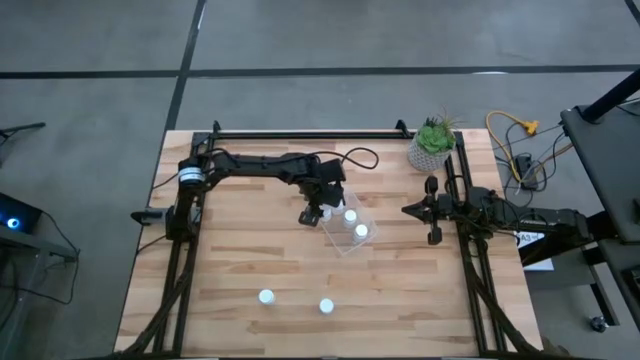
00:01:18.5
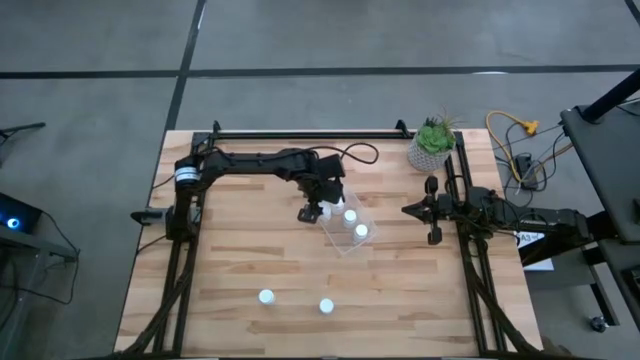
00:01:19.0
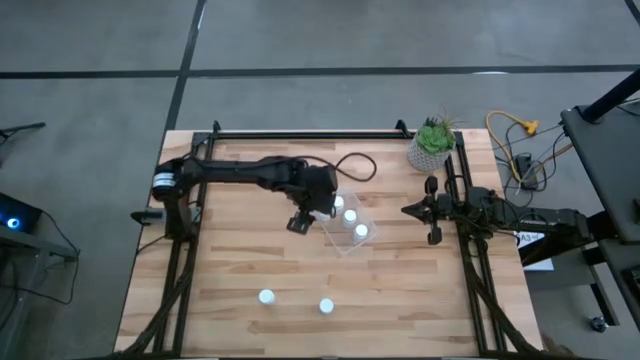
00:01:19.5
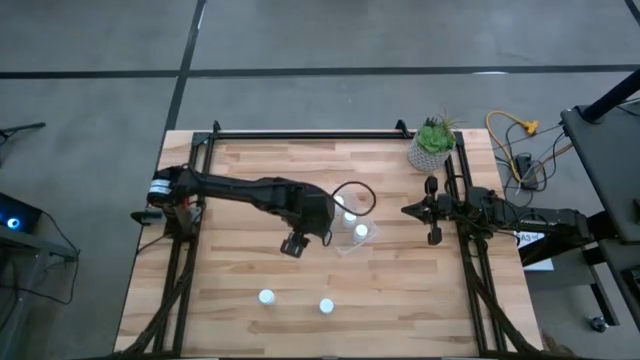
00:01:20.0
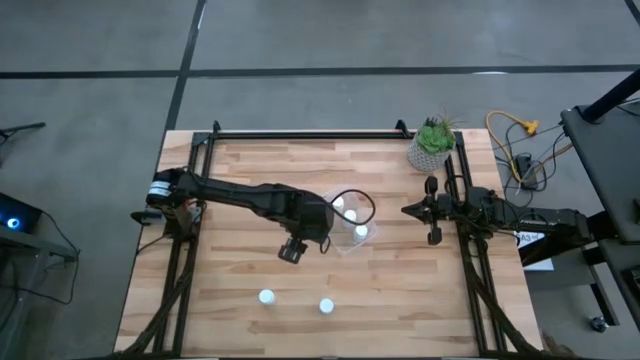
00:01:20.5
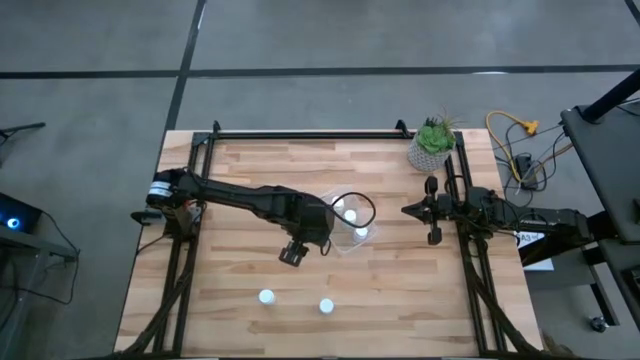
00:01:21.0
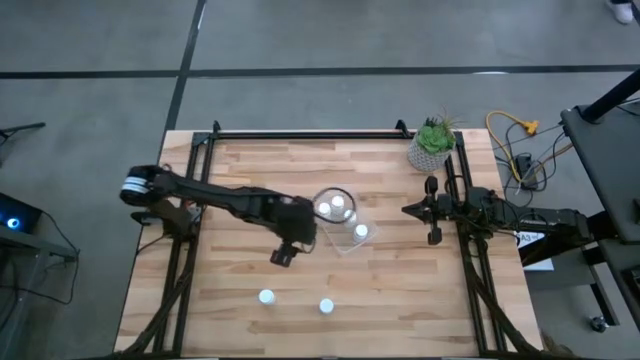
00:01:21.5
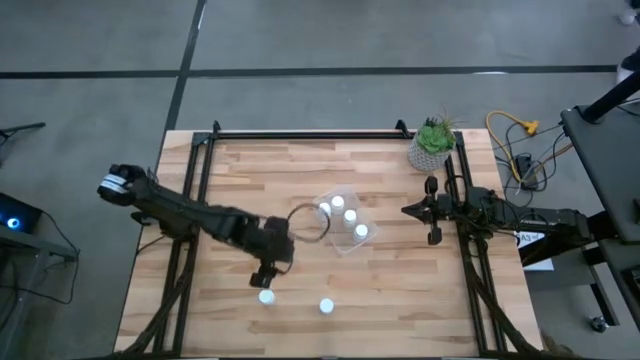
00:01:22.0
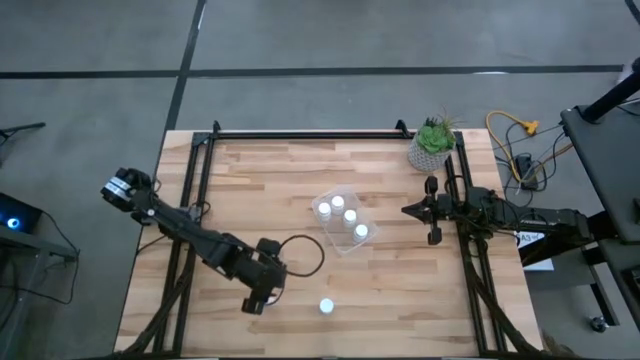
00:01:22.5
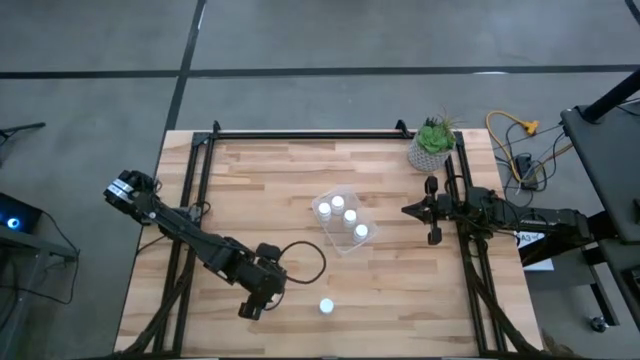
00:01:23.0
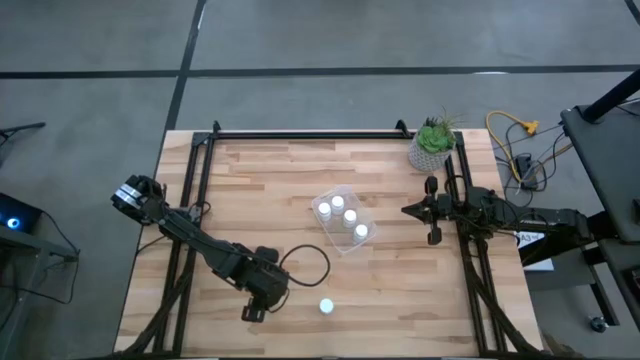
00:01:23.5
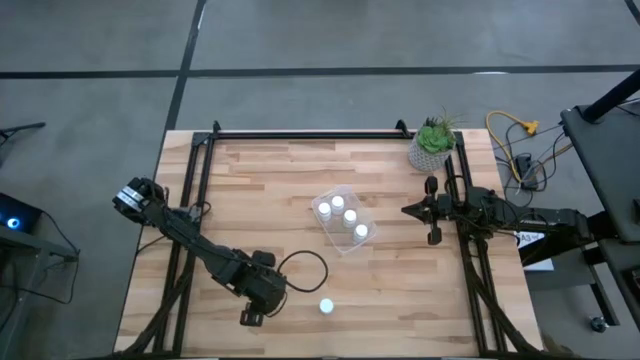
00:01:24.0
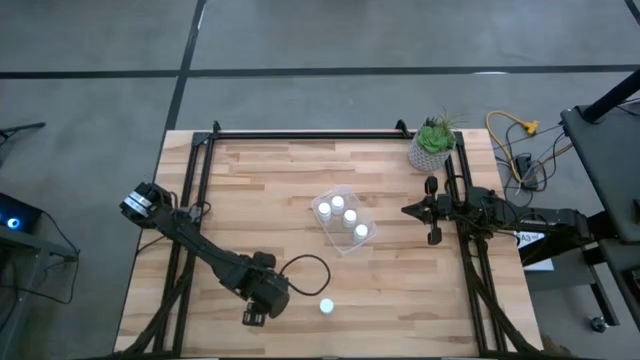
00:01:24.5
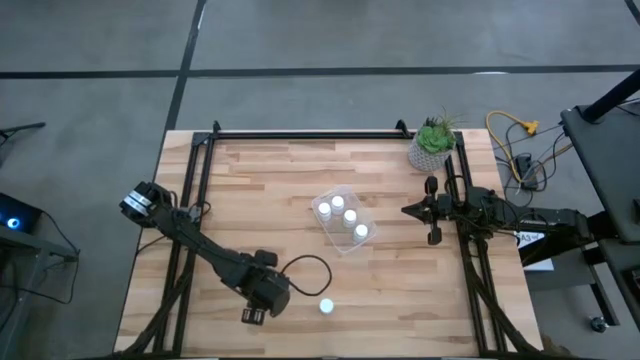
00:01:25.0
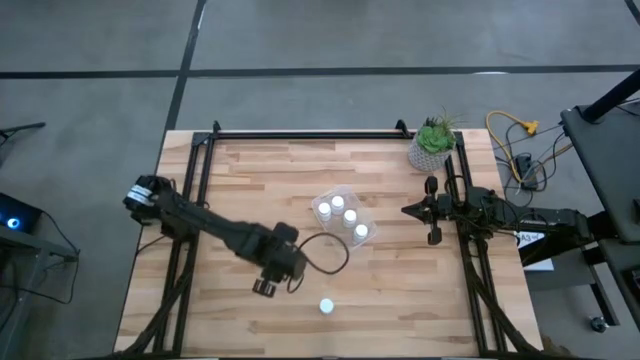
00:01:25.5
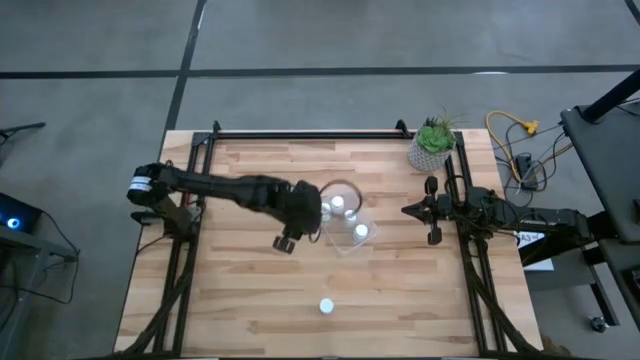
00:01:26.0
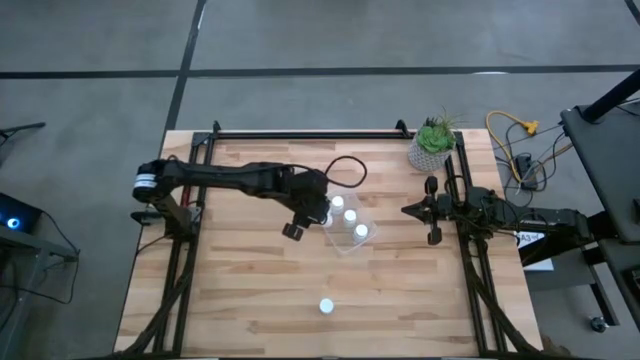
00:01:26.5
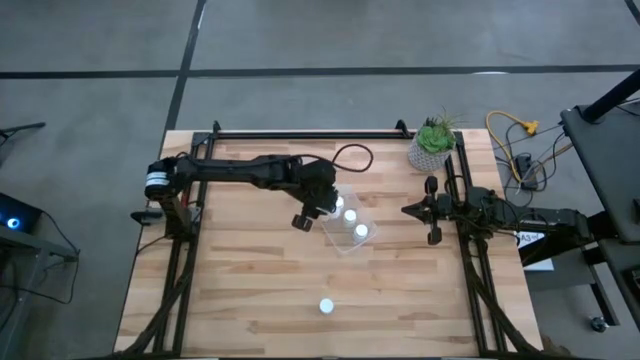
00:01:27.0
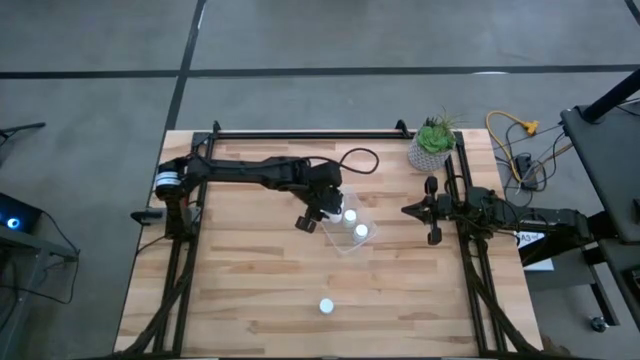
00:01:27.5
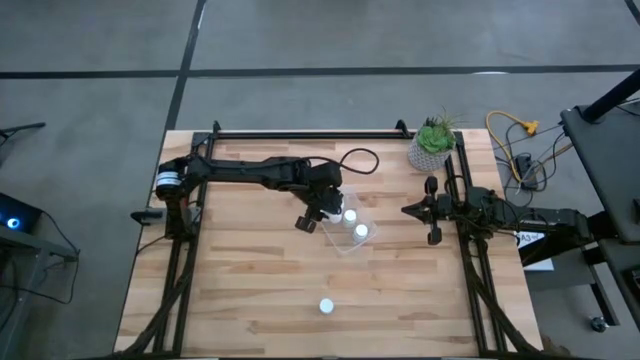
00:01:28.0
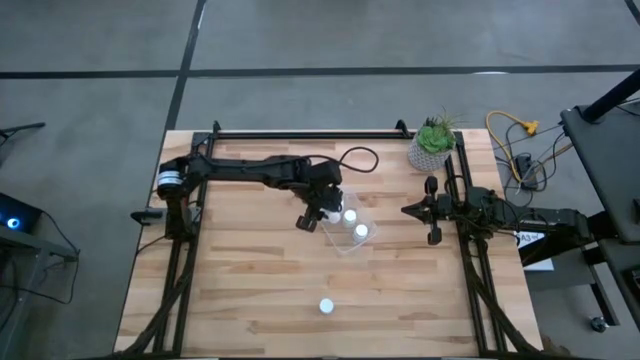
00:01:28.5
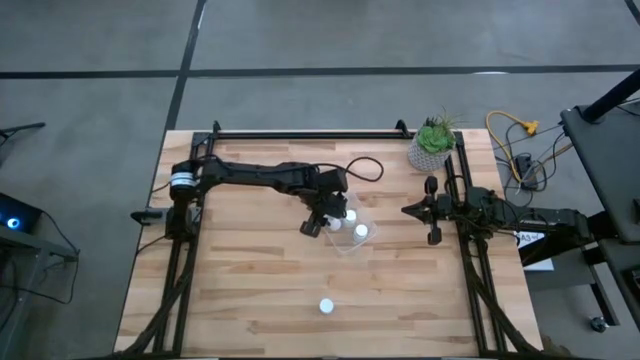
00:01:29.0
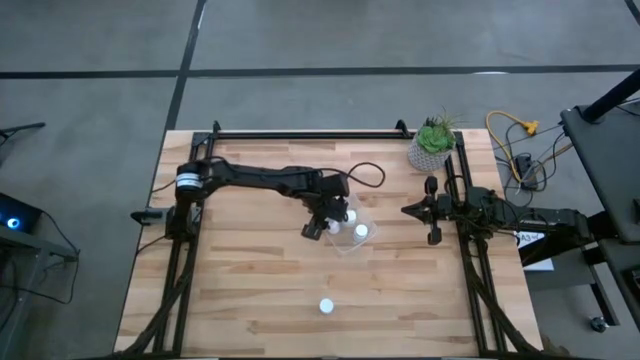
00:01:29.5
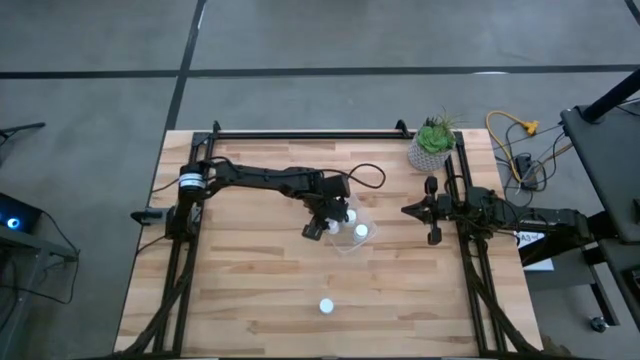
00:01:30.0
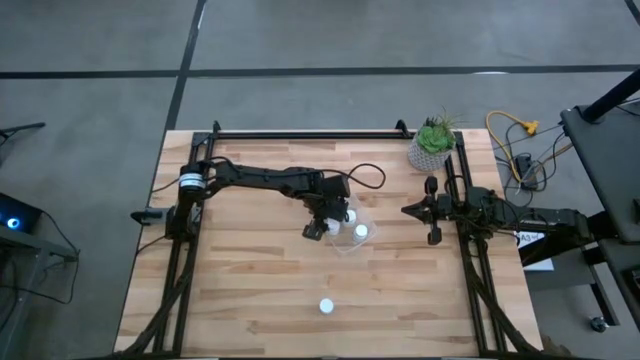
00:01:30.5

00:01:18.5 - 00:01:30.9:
Task: Pick and place pill bottles into a basket
Put the white pill bottle into the transparent bin

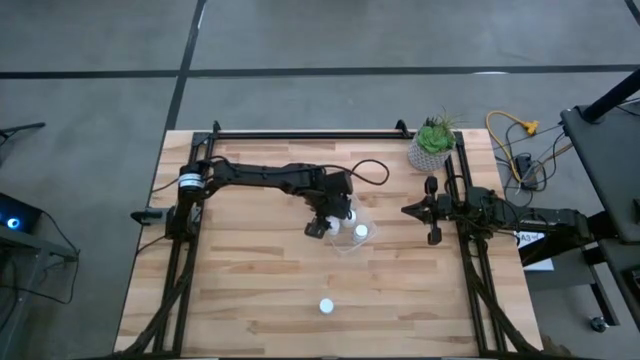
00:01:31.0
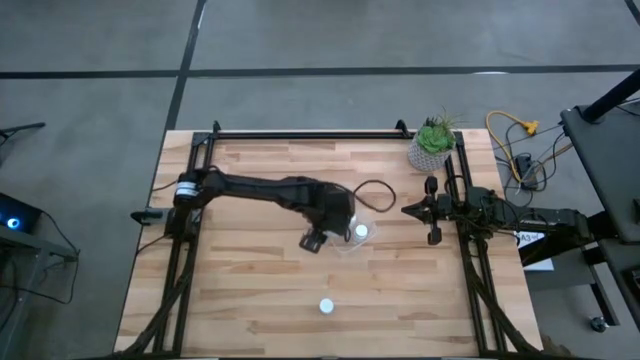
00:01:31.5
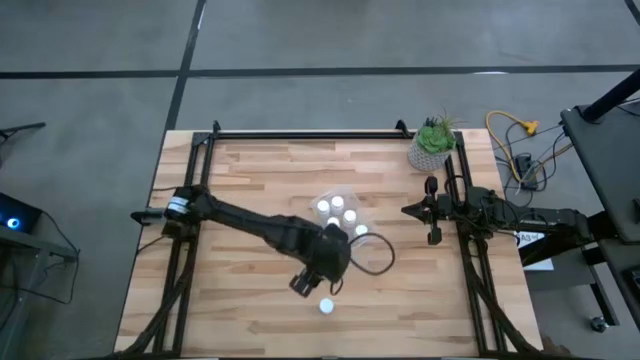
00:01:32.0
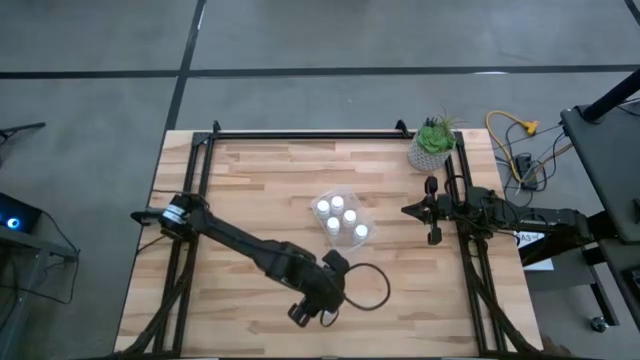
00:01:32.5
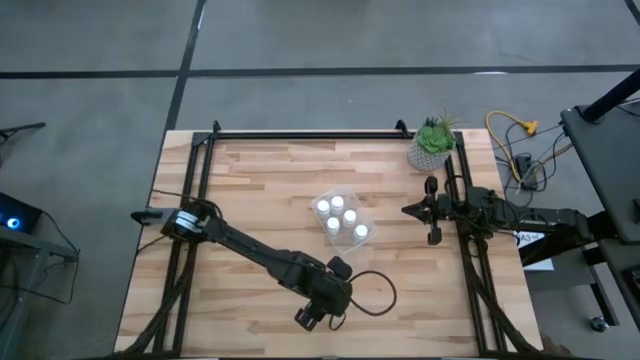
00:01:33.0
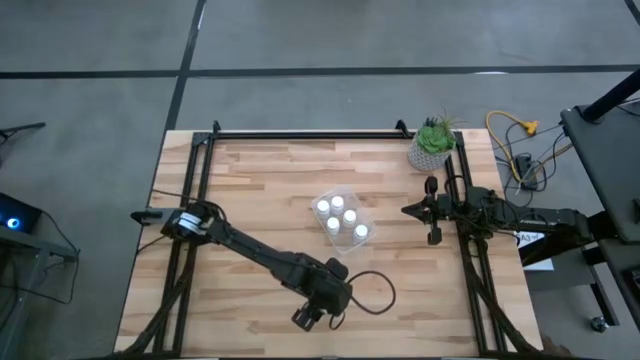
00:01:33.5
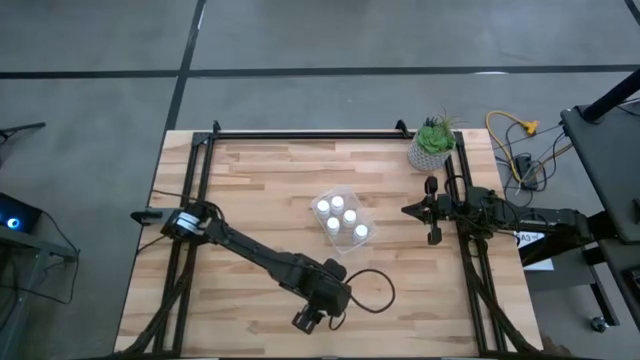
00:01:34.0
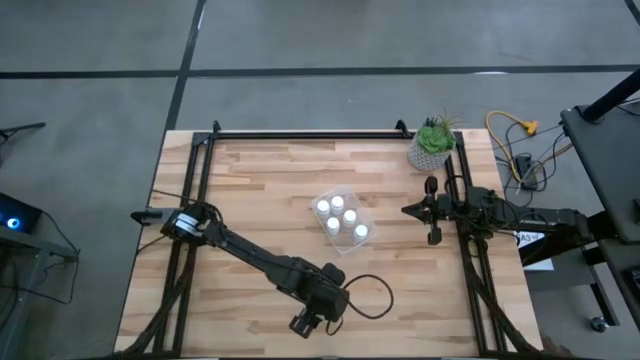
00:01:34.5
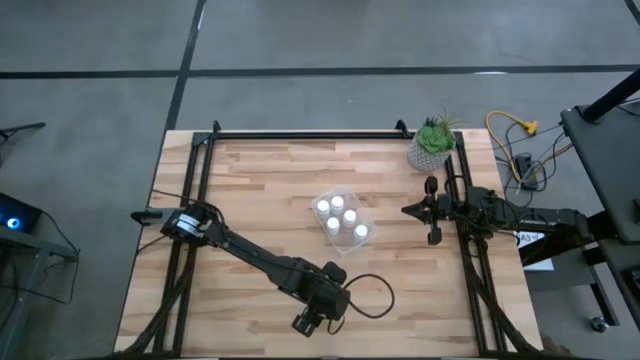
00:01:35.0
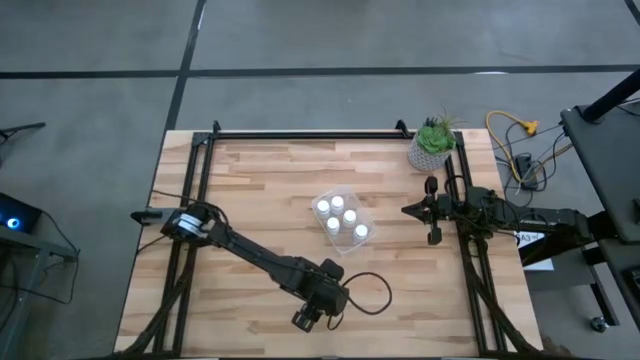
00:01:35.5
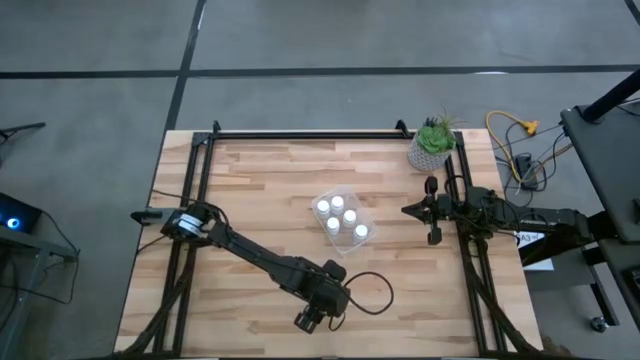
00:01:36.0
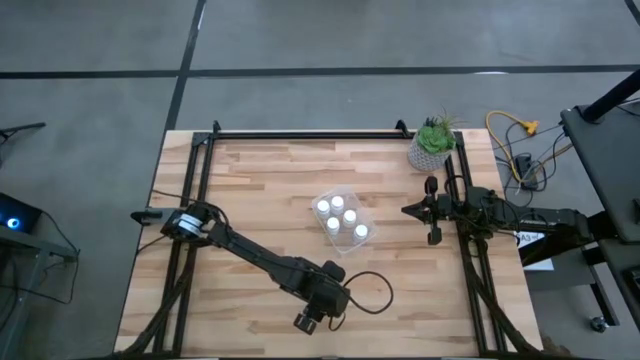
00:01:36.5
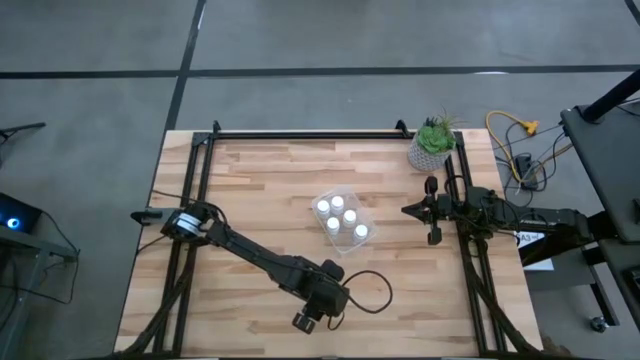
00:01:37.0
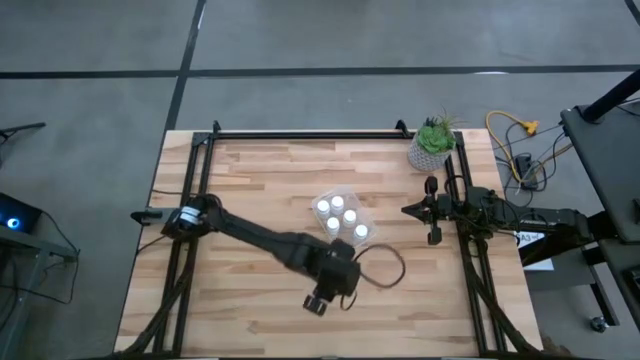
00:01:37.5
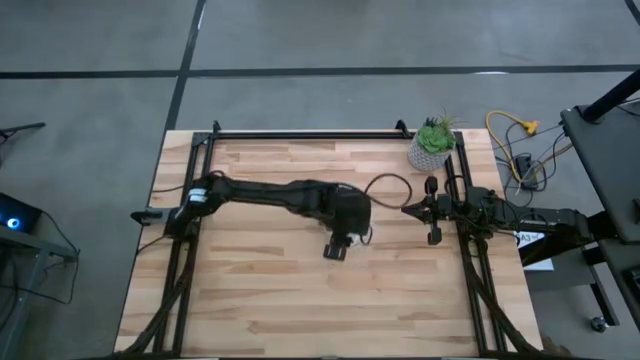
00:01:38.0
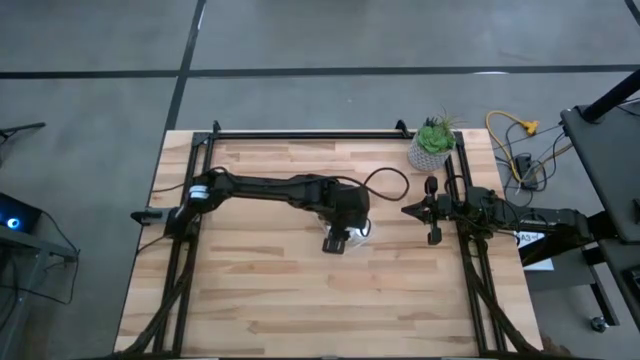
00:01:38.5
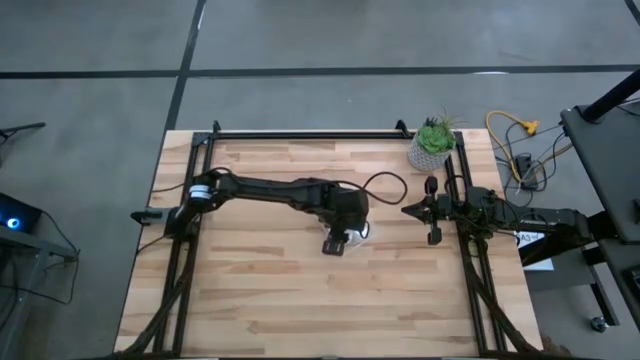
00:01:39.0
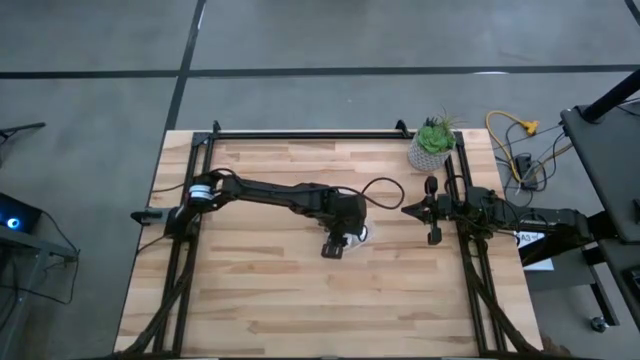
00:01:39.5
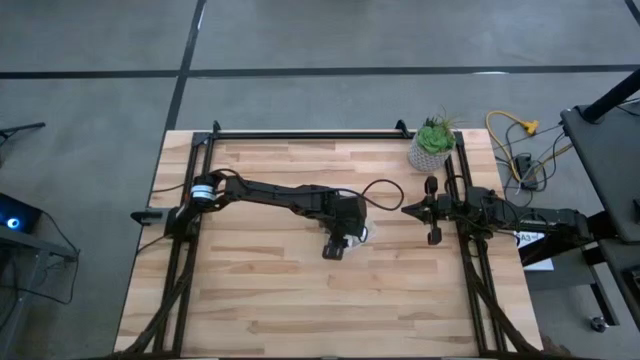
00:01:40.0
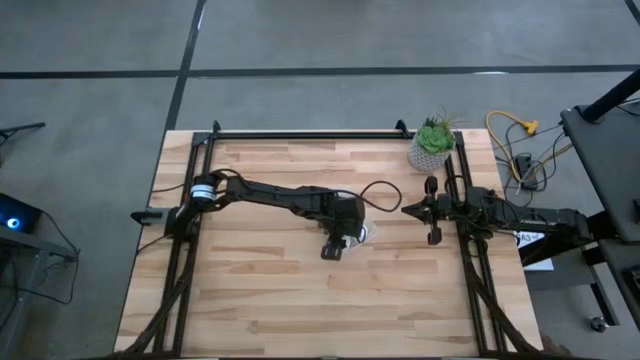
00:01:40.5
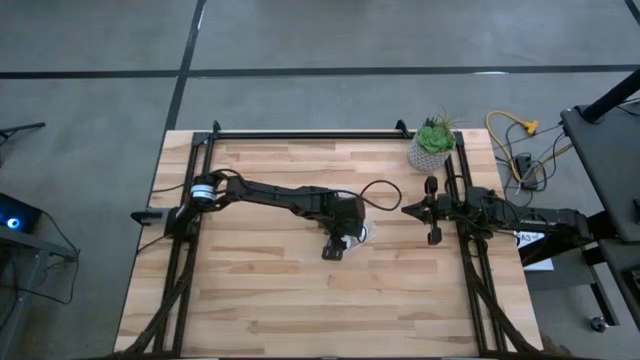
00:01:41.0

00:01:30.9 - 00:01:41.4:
Put the white pill bottle into the transparent bin
